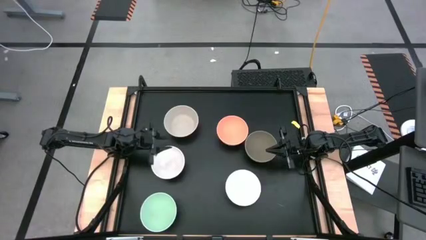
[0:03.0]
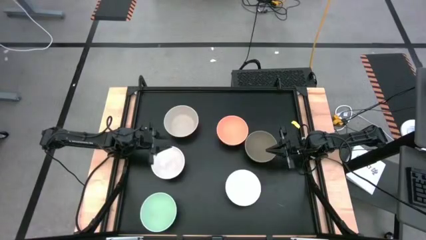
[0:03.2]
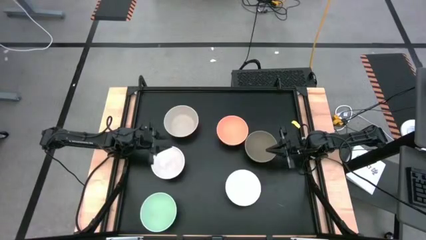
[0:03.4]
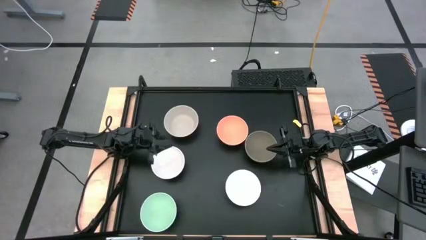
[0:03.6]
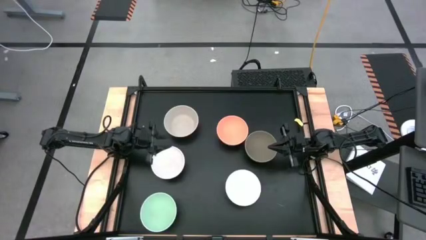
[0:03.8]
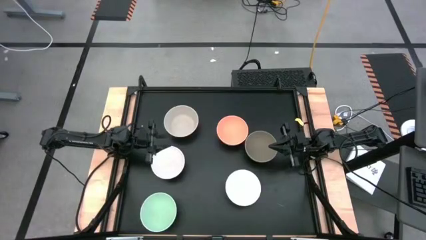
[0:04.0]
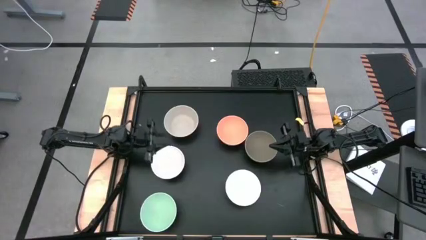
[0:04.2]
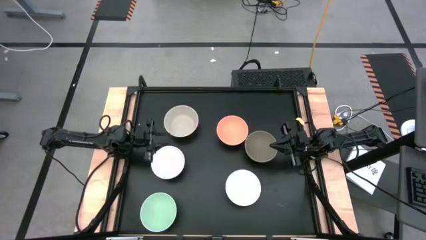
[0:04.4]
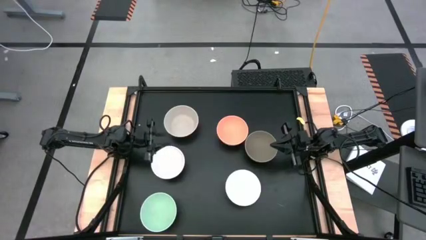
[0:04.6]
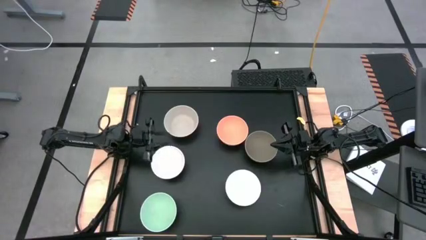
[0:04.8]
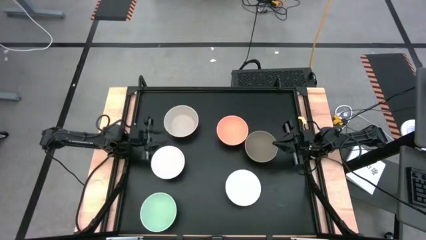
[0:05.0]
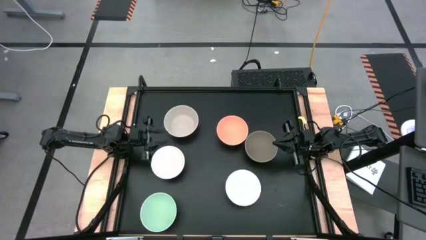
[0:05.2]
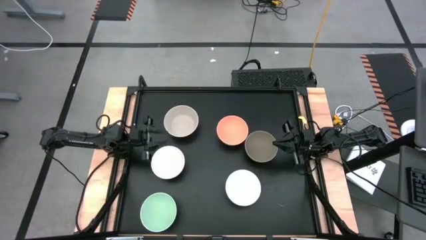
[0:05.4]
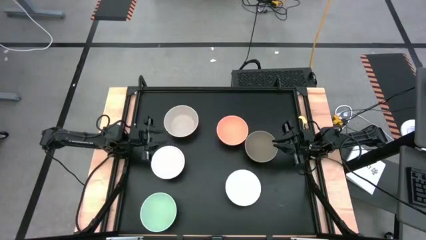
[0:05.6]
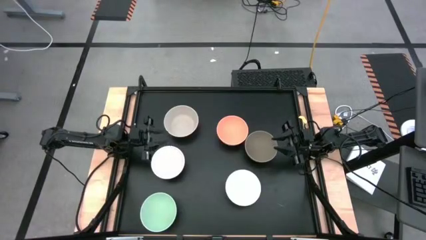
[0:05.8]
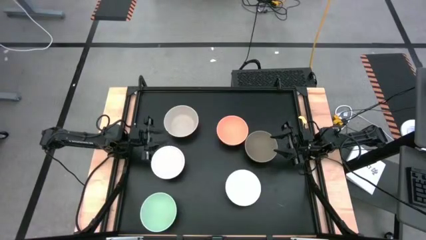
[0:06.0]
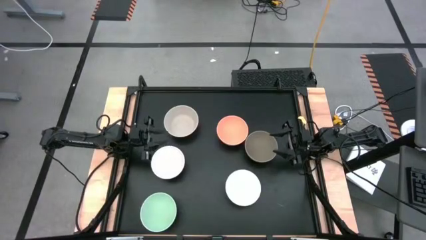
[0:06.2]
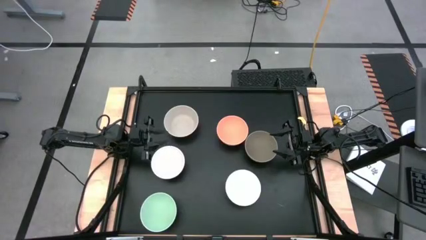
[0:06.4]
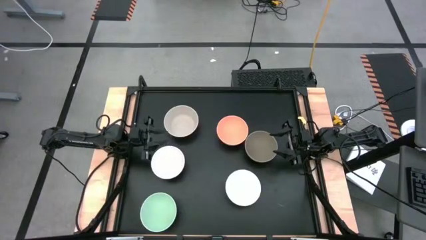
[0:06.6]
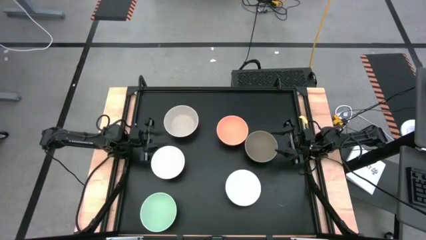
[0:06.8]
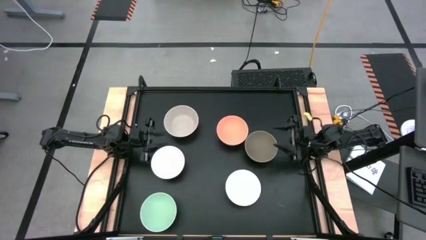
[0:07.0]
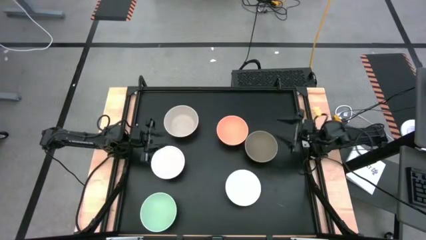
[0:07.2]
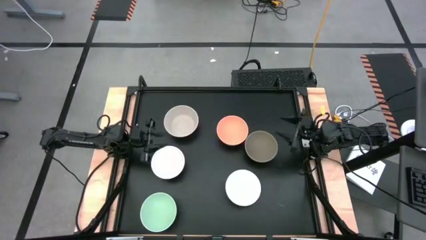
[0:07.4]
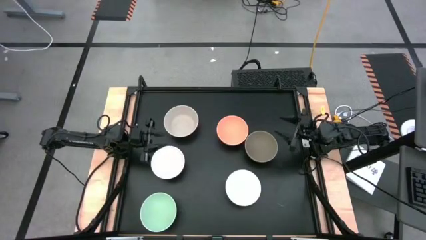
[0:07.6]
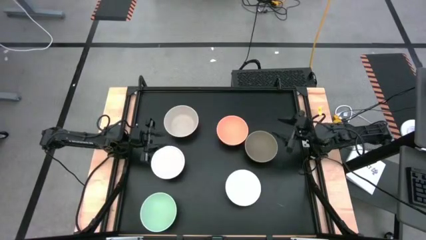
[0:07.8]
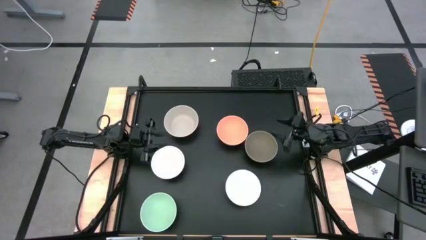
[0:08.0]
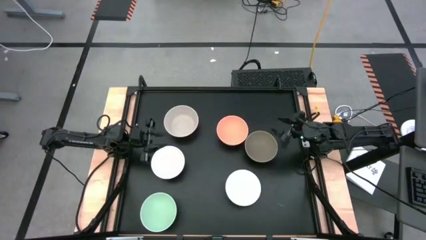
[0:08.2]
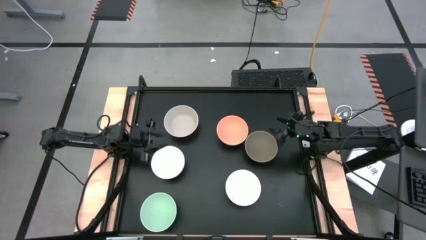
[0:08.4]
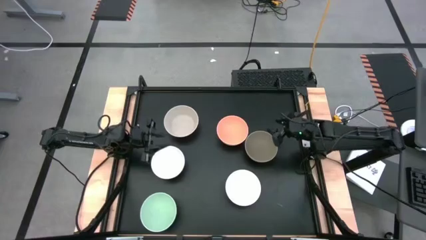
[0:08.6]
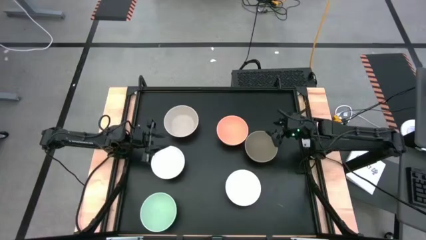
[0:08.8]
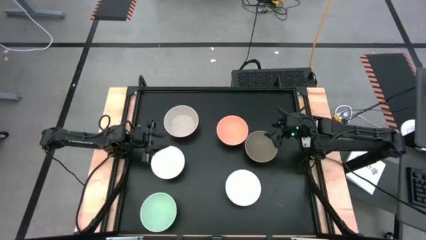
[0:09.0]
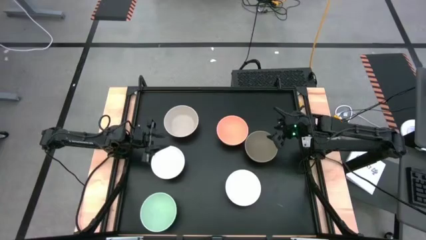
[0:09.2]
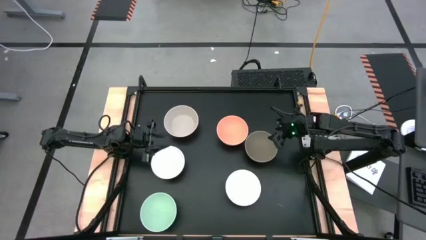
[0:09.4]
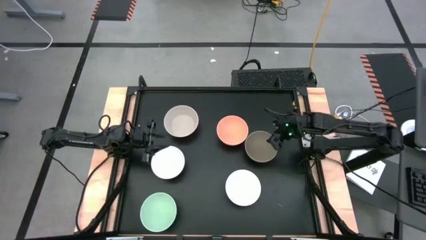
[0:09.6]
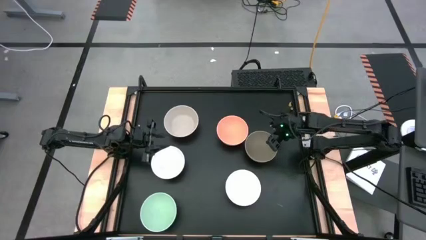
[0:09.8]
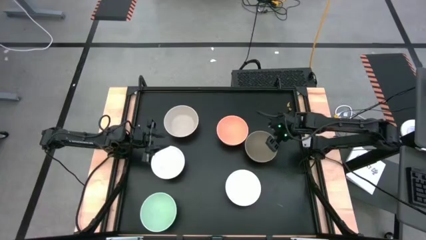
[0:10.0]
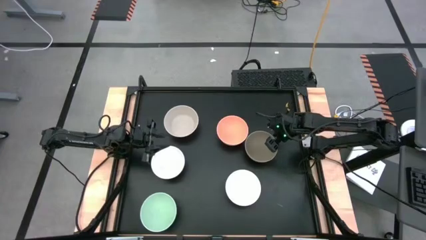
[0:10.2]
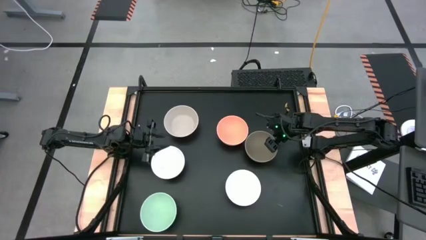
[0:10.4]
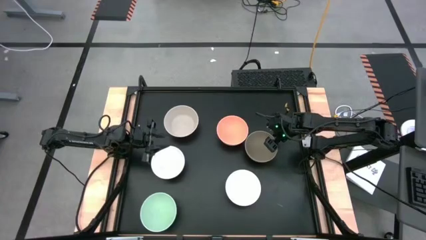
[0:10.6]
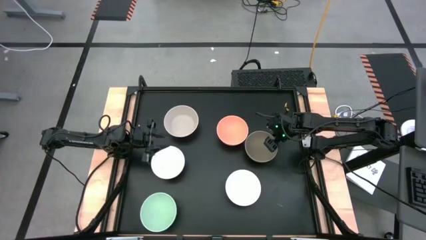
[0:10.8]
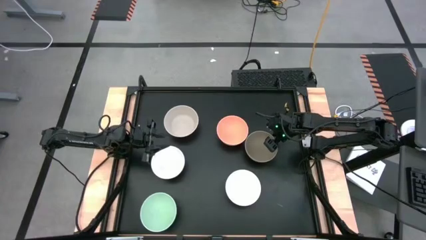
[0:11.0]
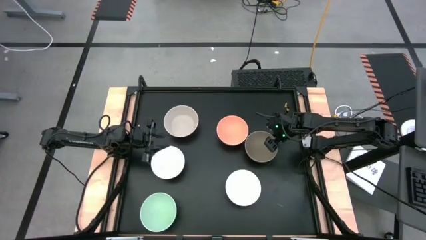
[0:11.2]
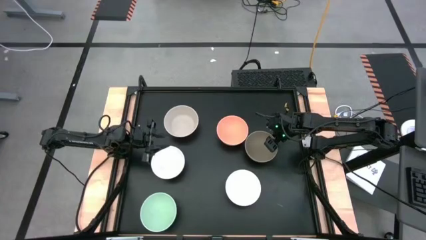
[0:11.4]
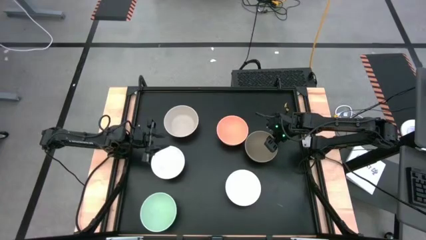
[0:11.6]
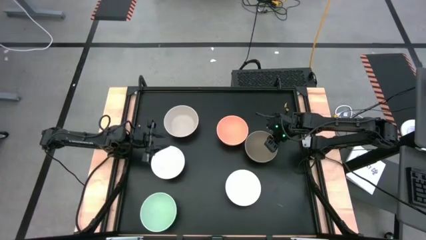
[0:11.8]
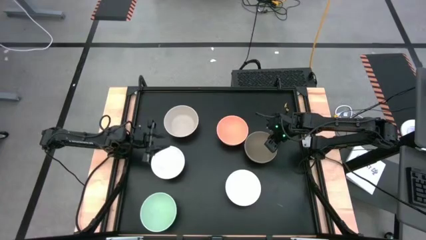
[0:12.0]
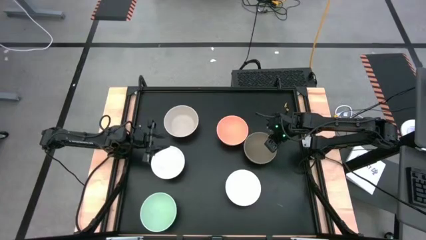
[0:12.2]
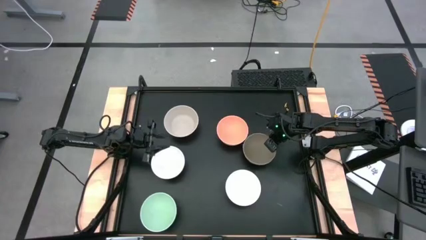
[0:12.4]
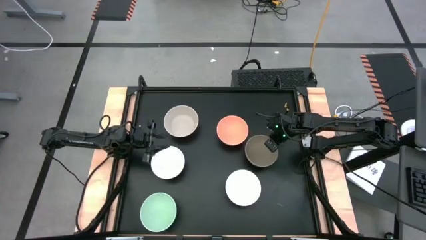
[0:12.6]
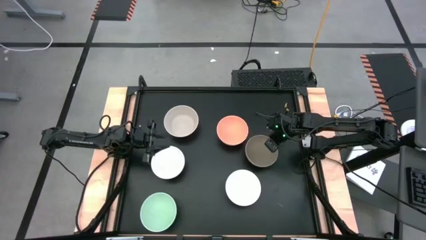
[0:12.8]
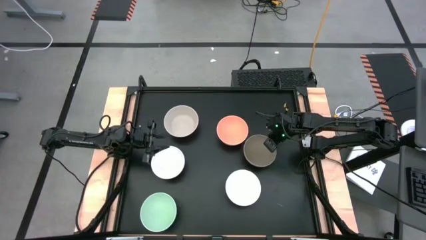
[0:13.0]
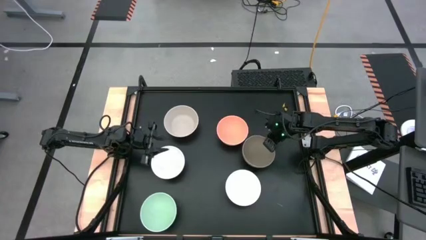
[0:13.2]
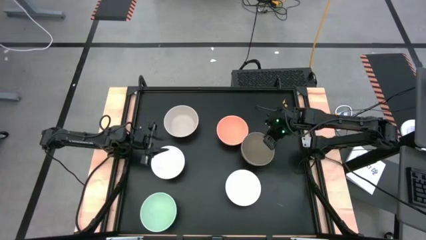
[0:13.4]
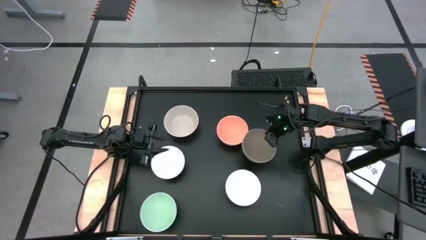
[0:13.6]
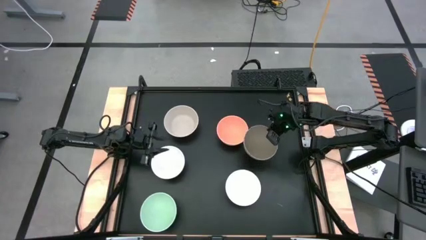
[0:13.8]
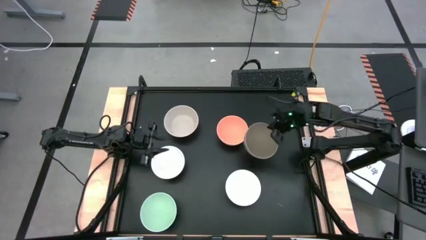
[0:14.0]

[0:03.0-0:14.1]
Task: Nest bowls inside each other
Stack the brown bowl on top of the orange bowl

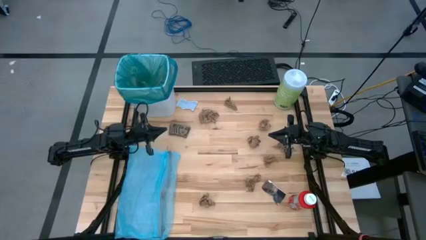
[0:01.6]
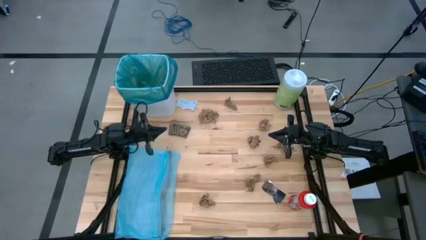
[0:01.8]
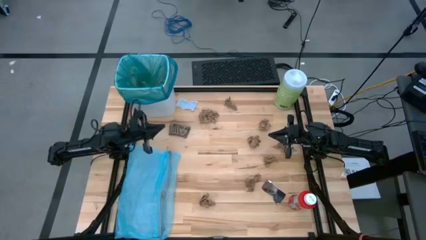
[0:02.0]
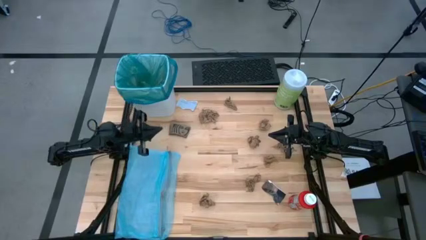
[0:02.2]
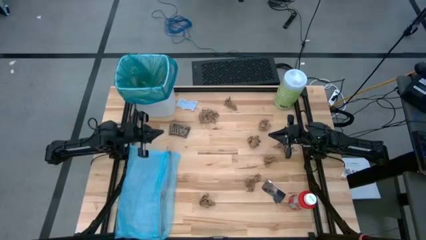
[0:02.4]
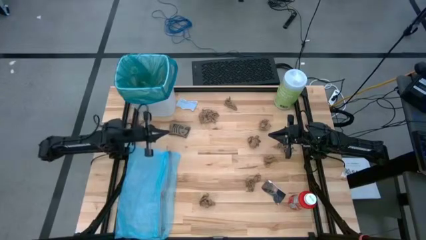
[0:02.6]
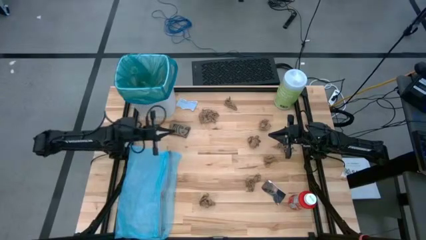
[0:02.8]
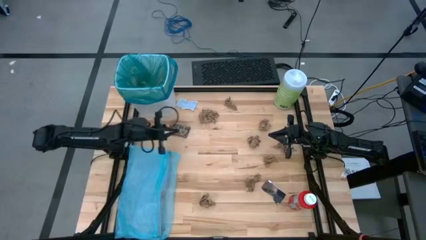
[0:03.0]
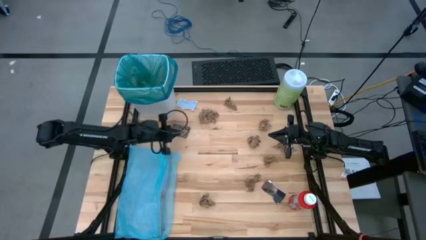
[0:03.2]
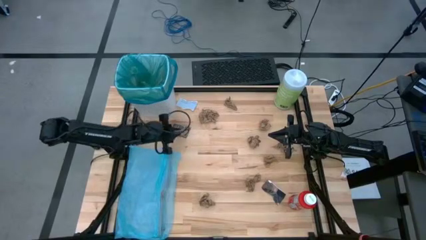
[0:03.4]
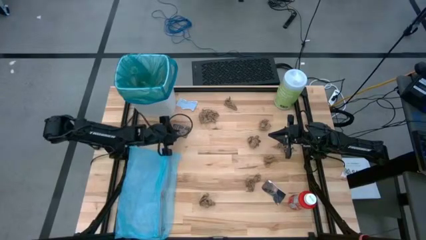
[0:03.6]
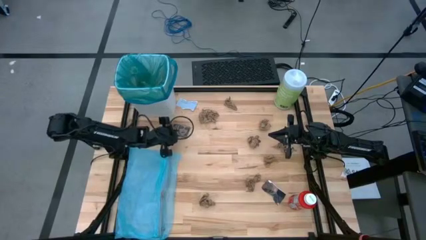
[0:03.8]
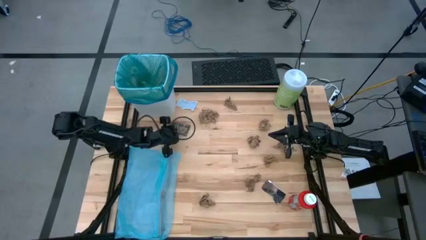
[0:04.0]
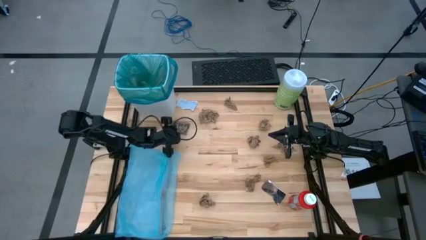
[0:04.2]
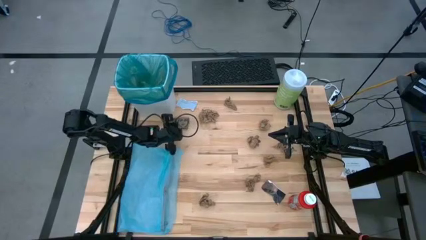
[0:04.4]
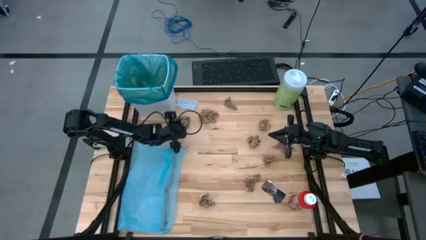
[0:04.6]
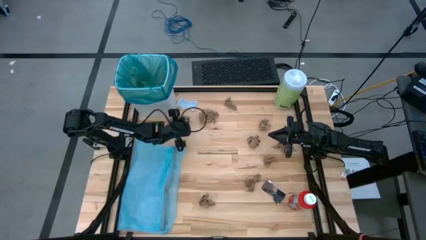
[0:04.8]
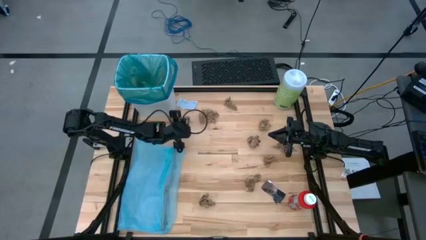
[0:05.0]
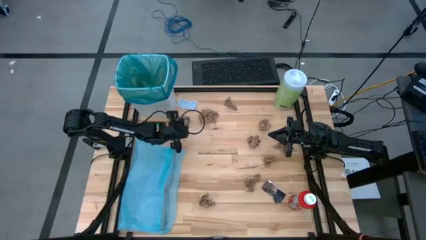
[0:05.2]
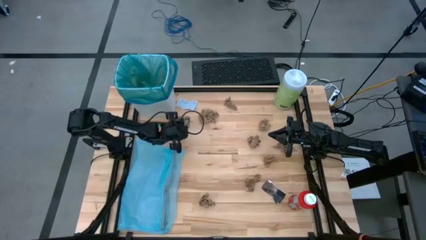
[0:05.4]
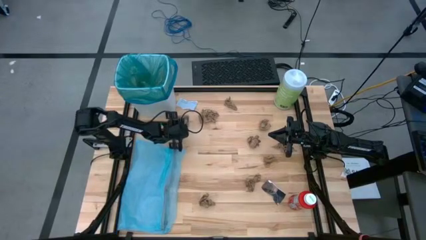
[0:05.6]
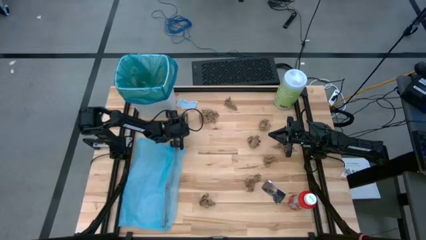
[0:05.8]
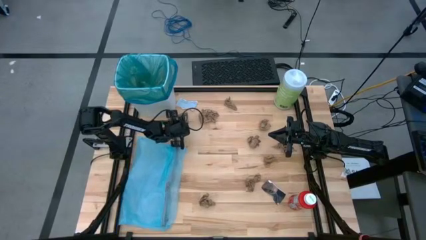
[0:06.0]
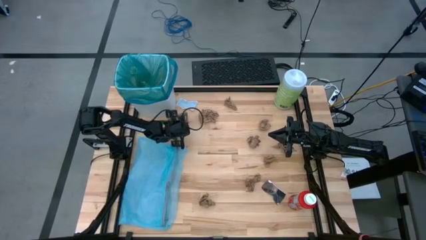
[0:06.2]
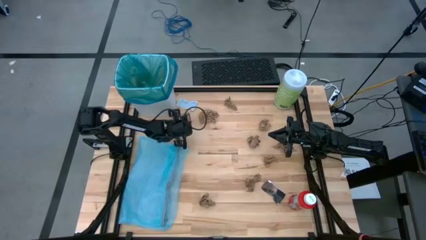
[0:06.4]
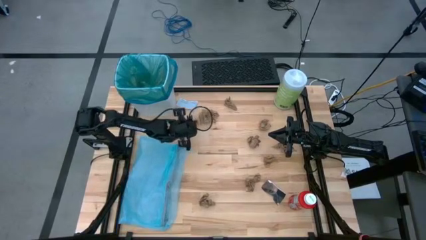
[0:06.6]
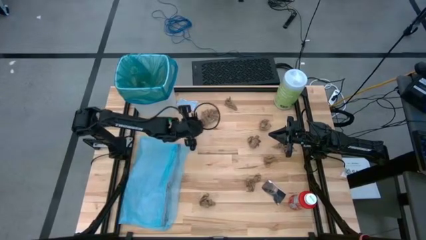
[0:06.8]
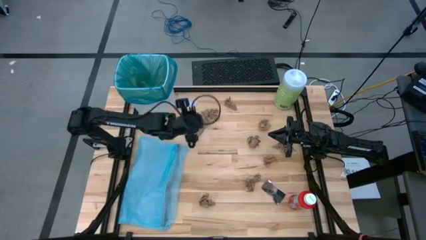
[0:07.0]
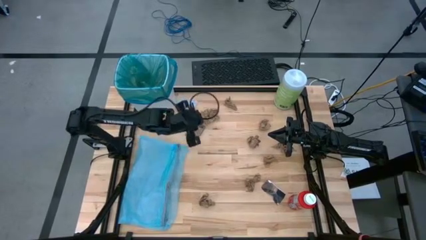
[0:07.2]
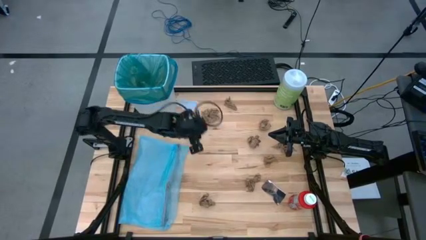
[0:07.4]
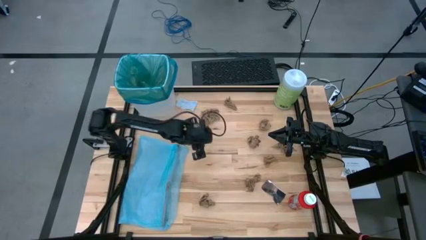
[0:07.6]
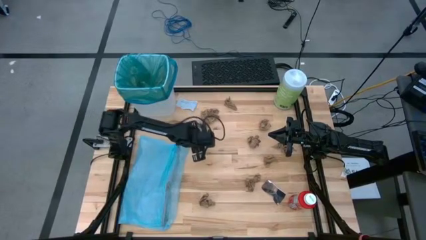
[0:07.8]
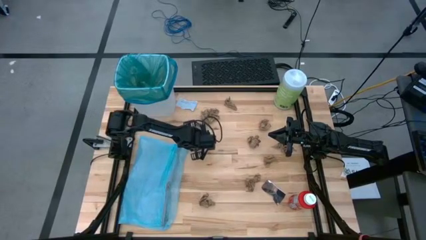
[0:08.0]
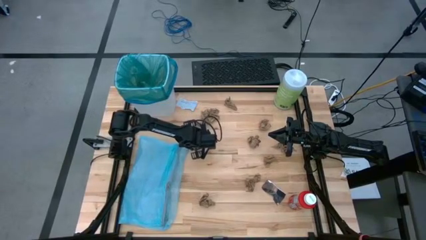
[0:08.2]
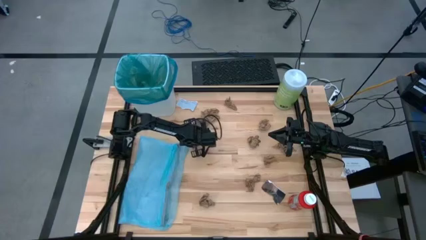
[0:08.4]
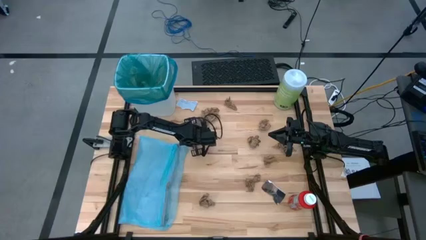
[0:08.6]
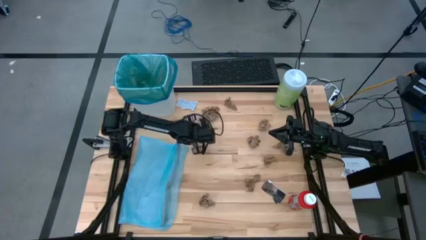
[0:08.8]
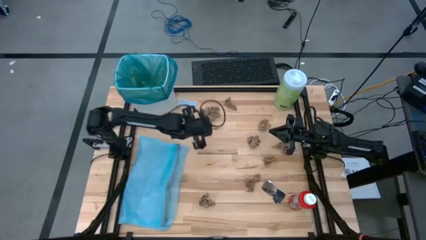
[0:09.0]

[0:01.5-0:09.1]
Task: place trash/remove bag and relplace
Put the brown cardboard paper into the blue trash bag inside the white trash bin
